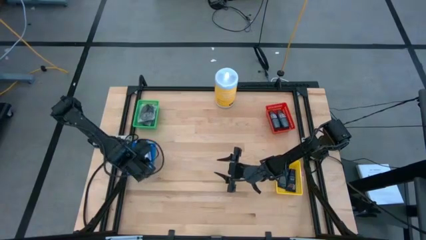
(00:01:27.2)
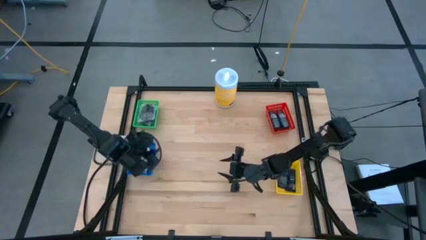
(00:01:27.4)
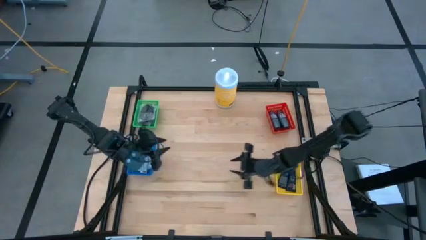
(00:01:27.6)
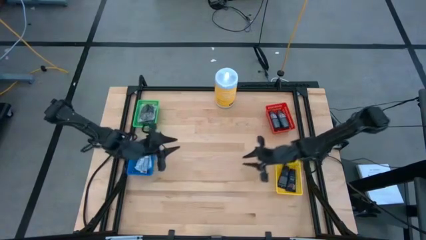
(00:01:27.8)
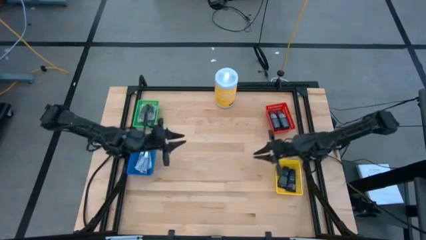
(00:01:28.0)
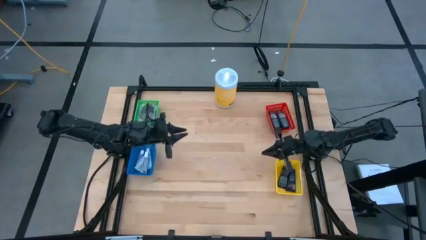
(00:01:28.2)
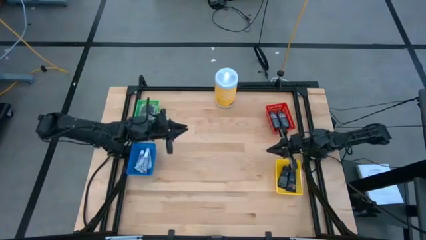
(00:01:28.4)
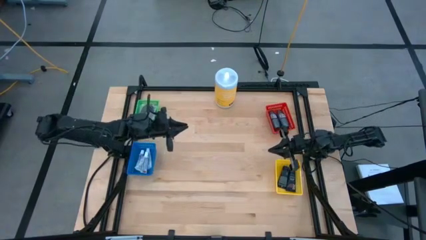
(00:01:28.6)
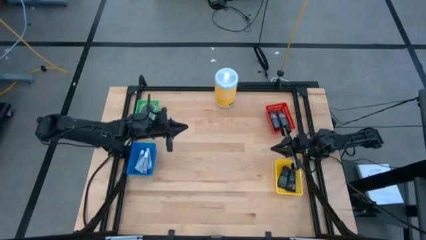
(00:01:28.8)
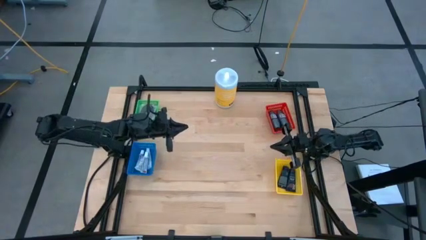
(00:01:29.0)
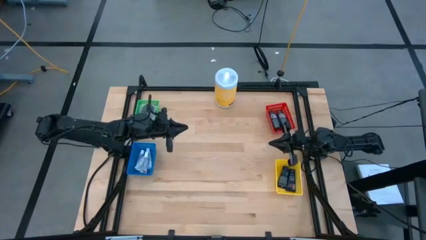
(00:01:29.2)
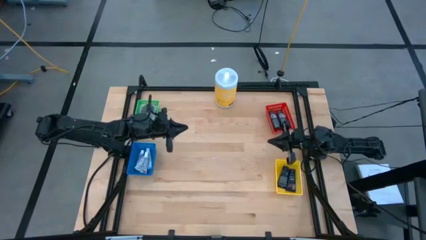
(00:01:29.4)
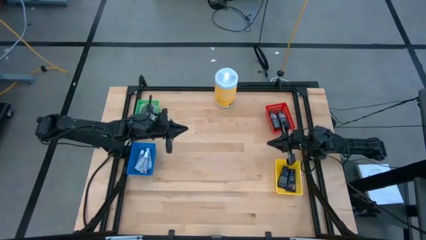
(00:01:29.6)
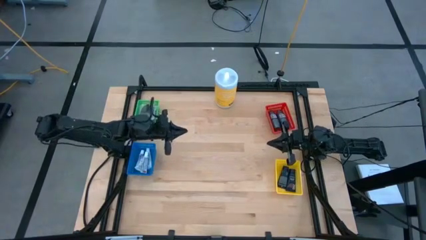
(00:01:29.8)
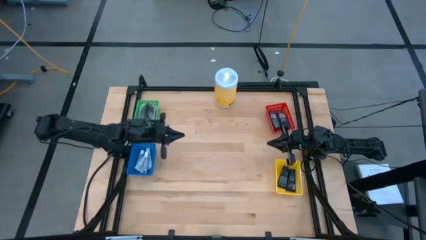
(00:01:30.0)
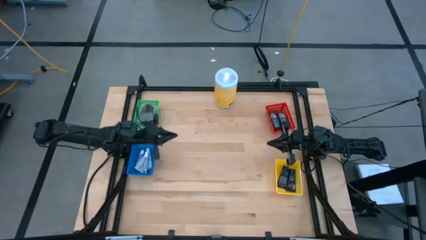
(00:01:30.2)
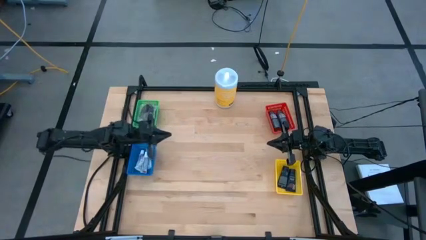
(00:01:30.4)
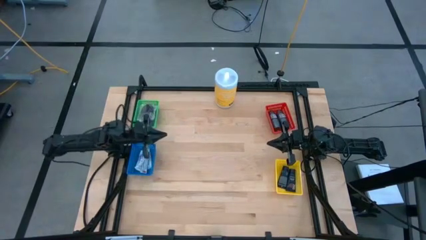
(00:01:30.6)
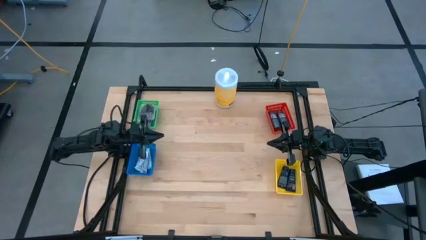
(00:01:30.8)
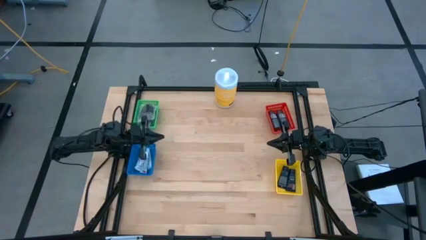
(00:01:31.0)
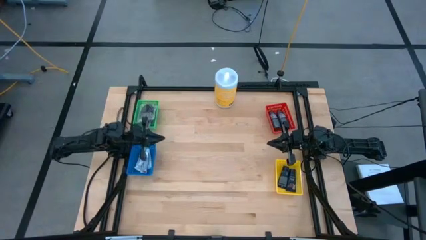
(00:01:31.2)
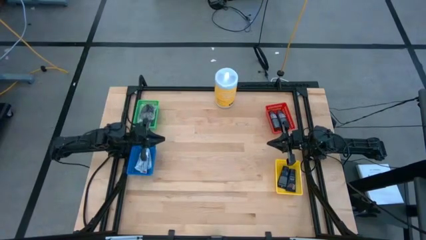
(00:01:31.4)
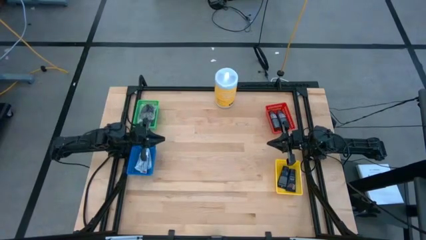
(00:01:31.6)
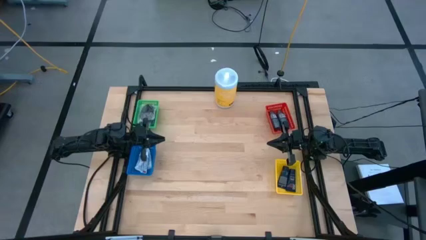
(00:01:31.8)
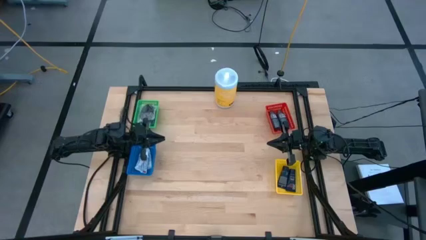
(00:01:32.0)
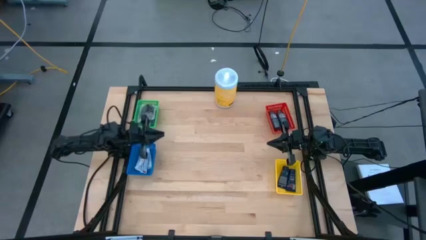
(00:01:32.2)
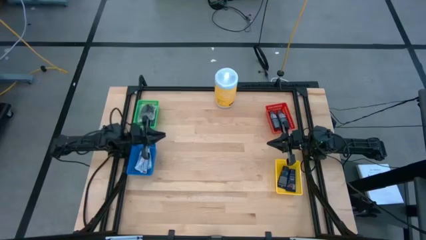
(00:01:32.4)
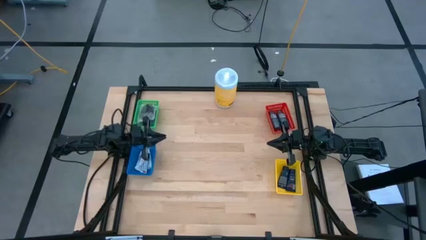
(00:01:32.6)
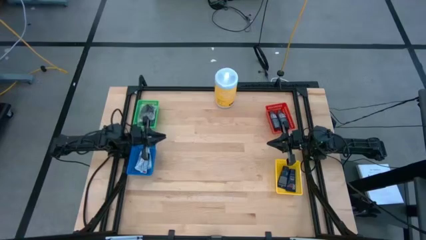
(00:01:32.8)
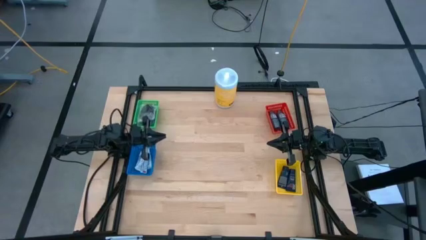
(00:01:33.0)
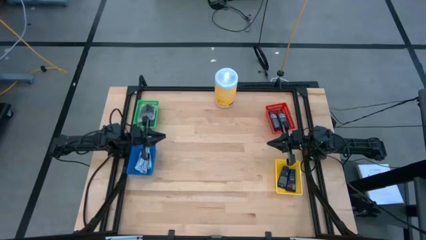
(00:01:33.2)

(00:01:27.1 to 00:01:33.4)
Task: Pick & Place Travel size toiletries
Return to home position

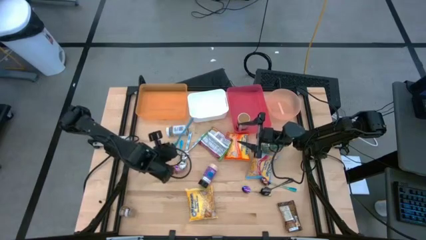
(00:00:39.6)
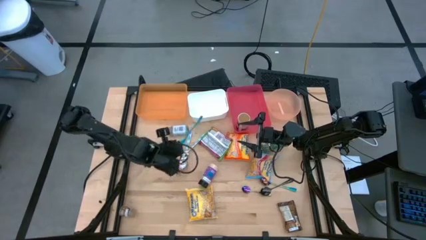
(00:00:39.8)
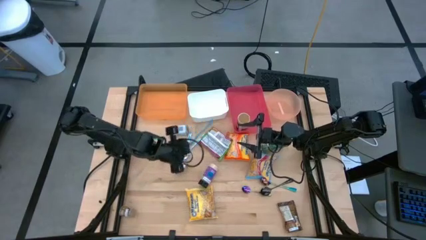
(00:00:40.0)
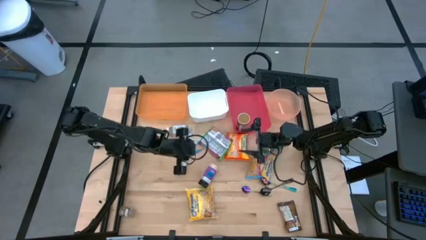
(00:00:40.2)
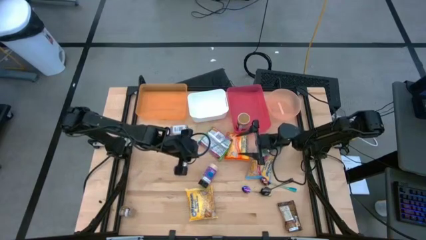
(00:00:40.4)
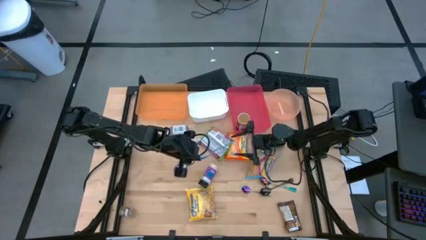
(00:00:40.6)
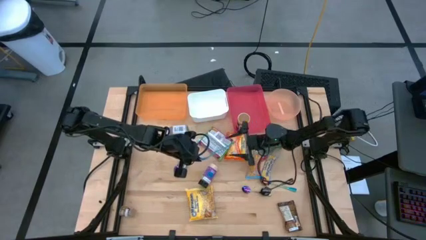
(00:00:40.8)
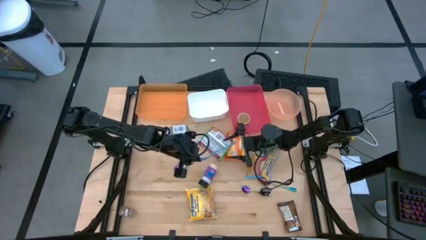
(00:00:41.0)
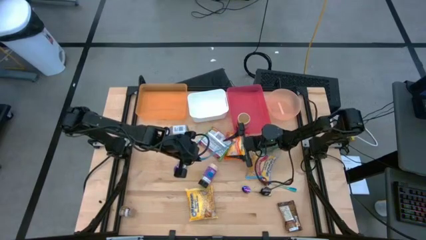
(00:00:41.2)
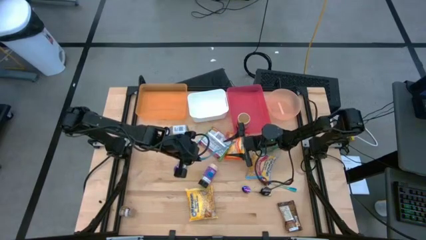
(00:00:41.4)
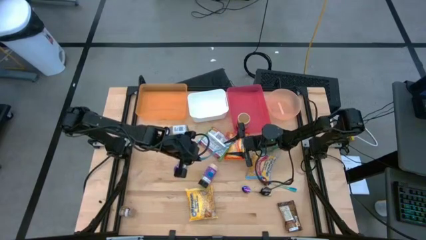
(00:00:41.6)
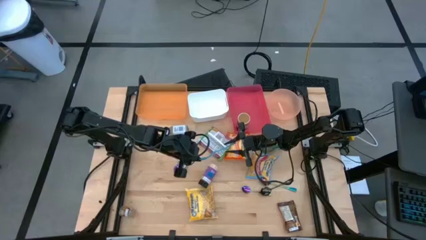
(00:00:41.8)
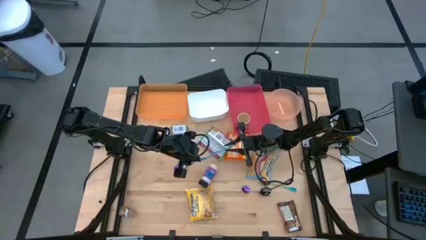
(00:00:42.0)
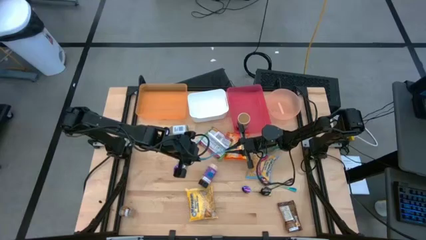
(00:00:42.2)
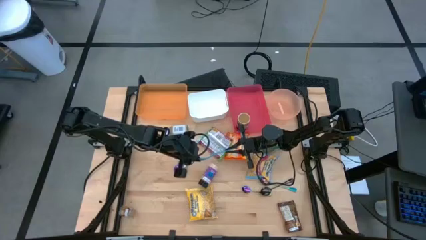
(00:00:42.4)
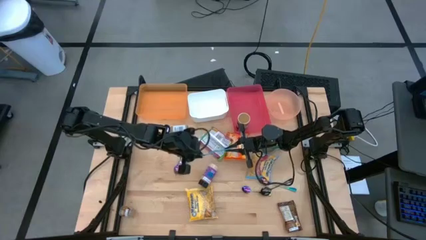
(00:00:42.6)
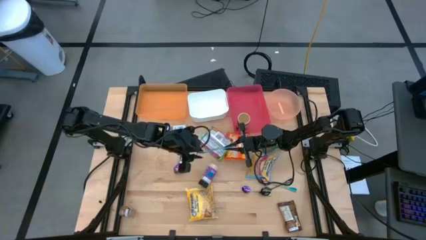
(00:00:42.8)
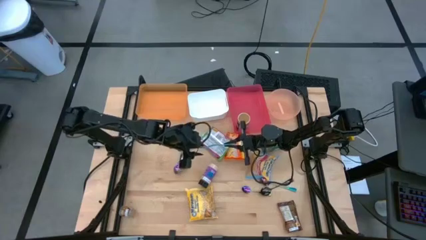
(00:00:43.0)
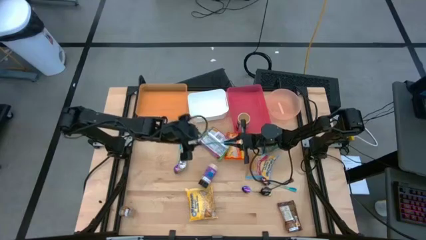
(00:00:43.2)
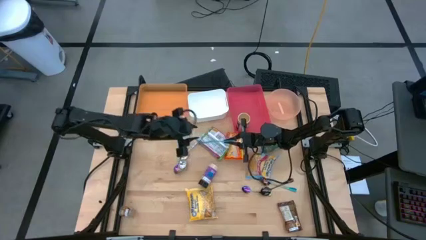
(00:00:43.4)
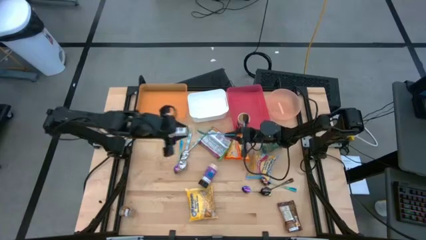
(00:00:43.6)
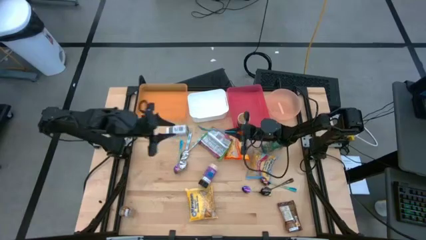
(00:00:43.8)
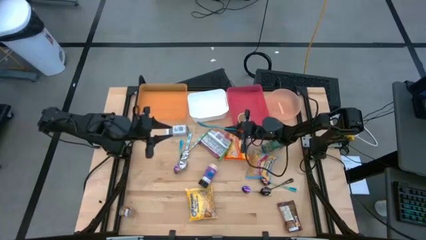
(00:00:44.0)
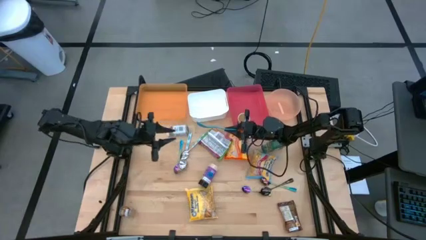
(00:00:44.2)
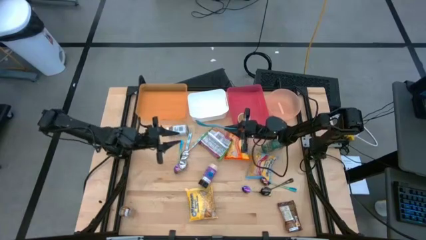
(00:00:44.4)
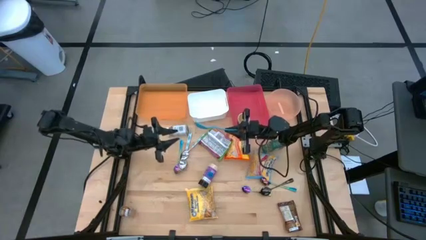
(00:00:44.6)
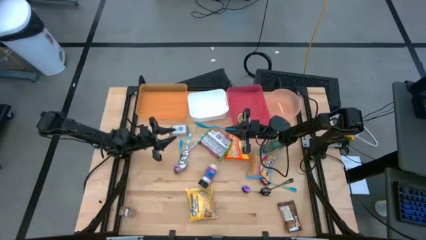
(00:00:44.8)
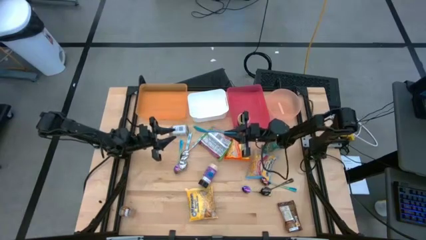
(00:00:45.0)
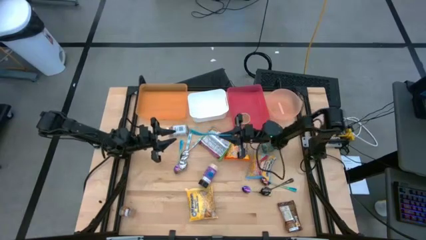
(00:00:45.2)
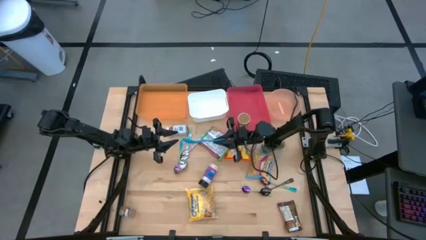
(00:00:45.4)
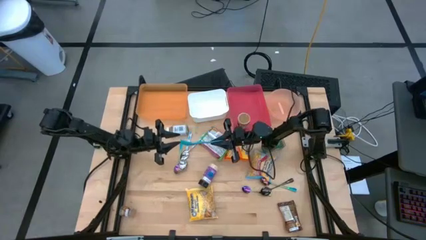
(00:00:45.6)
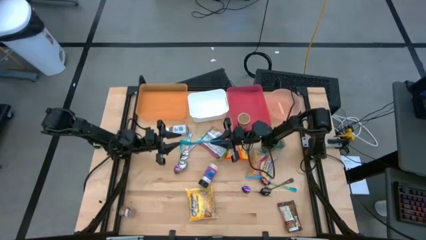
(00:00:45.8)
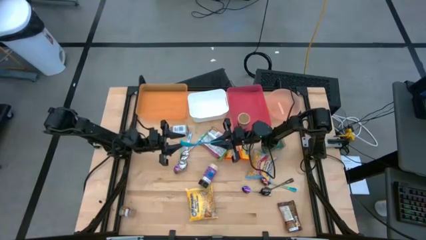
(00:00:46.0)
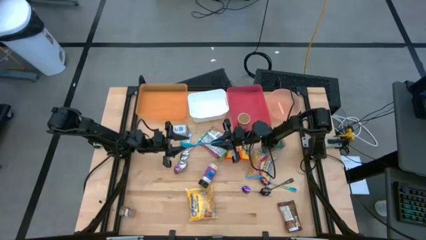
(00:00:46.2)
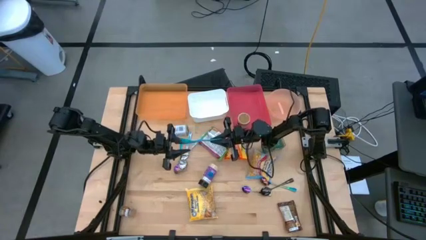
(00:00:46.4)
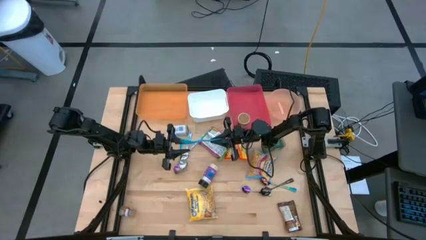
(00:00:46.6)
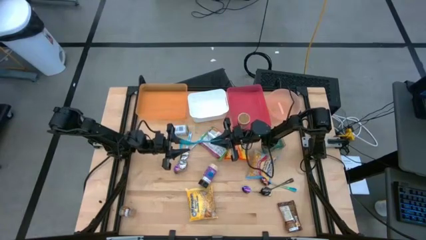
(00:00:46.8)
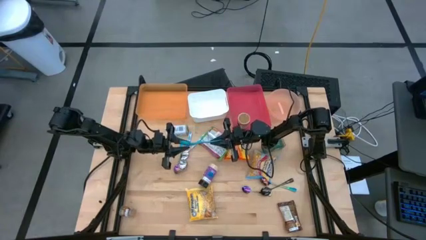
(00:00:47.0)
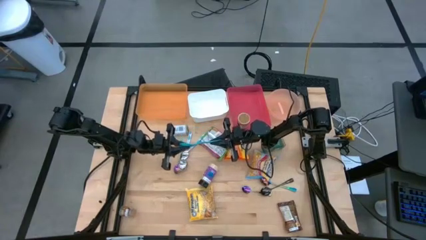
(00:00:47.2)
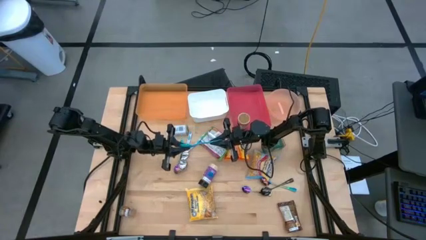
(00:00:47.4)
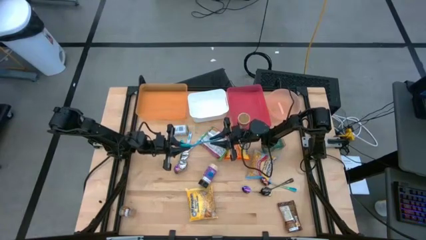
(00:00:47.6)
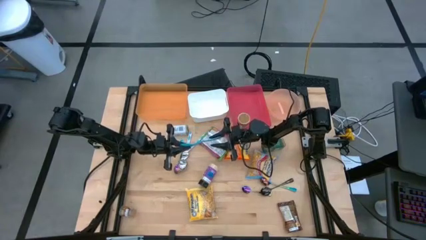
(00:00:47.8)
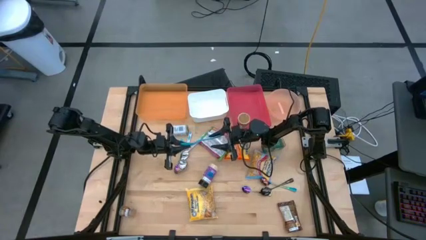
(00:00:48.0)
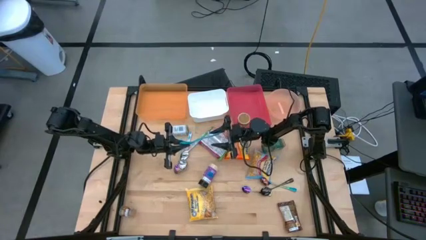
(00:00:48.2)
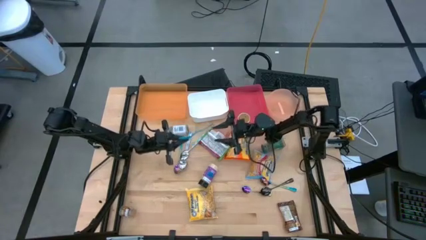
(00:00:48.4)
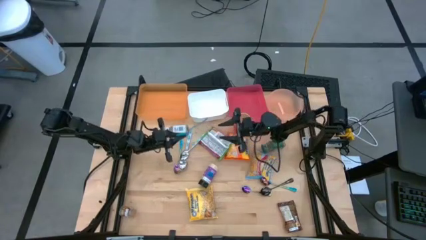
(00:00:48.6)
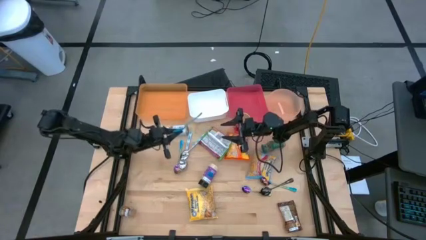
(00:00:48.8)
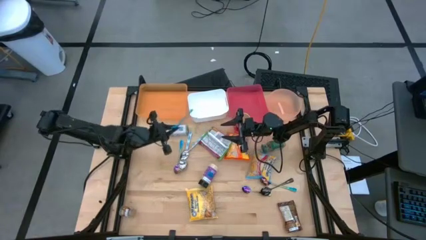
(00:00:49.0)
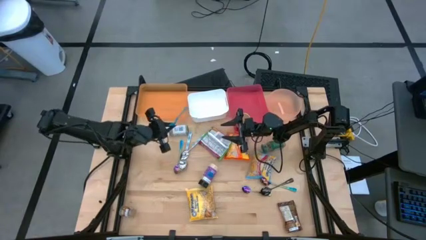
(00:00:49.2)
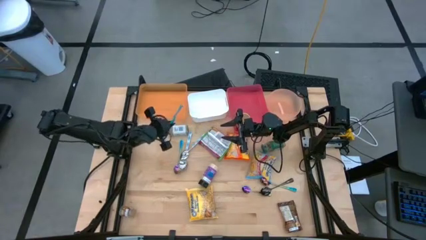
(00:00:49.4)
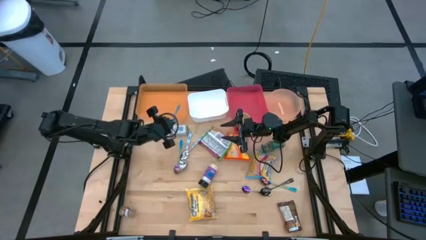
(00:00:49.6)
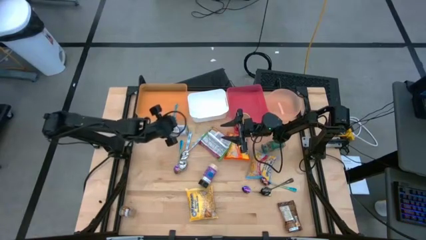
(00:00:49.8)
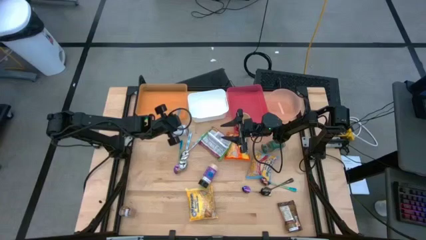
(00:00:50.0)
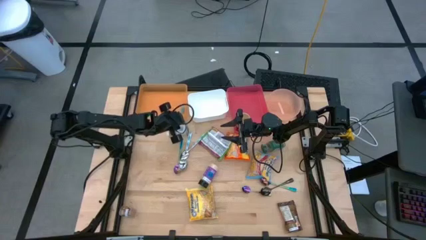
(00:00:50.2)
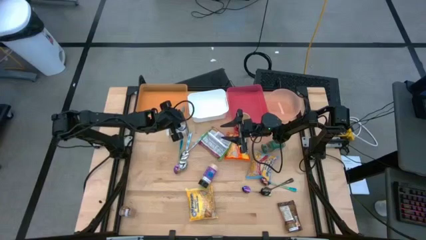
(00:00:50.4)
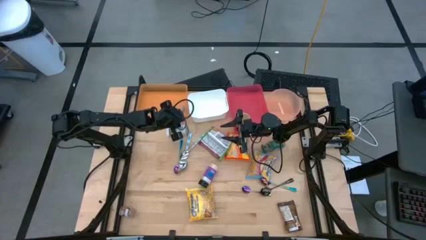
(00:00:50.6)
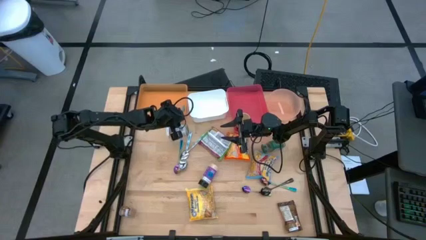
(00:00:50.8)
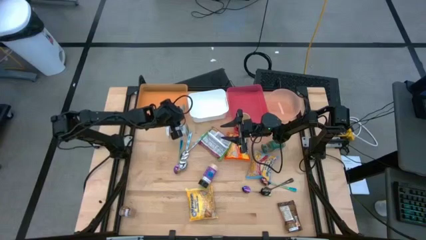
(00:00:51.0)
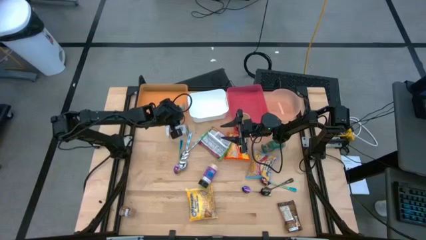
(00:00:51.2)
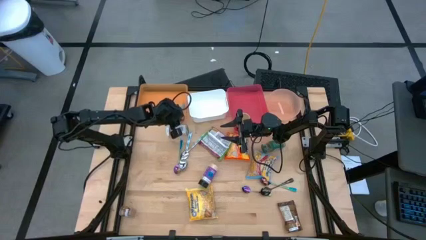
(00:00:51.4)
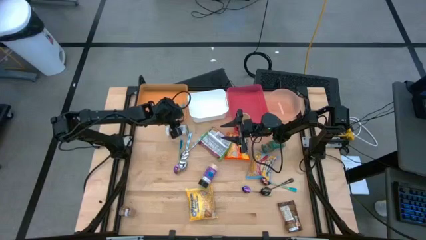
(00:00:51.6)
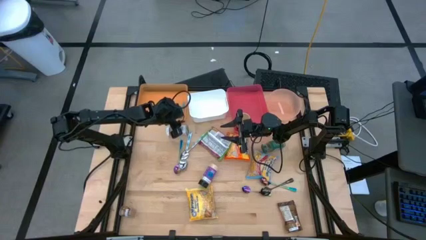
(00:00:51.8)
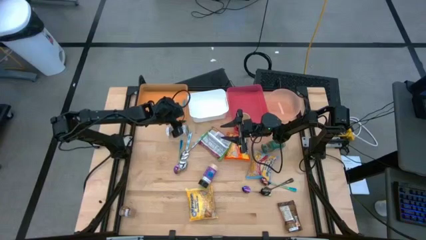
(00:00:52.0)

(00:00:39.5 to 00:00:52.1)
Task: Pick & Place Food Item
Put the blue baby spoon into the orange bin
